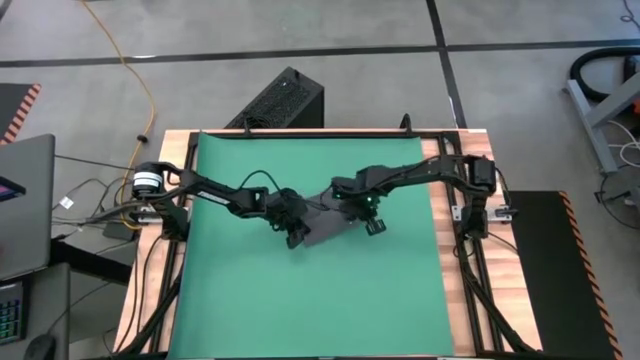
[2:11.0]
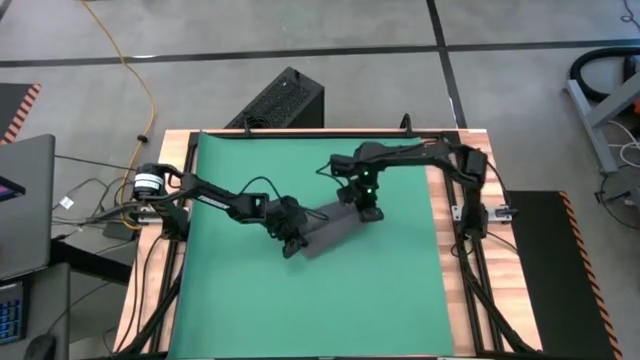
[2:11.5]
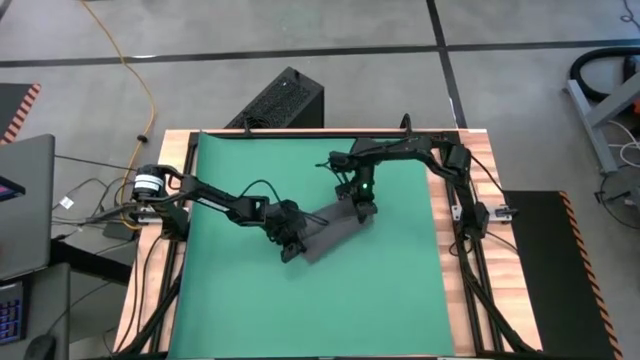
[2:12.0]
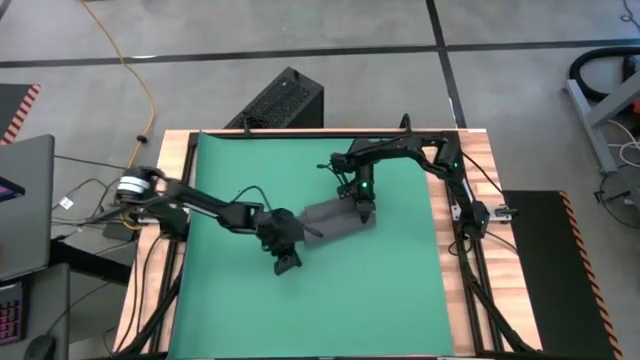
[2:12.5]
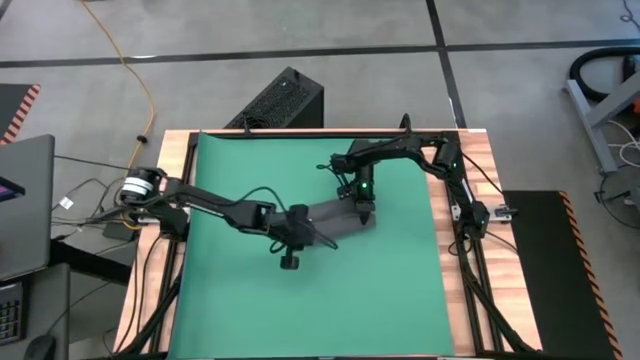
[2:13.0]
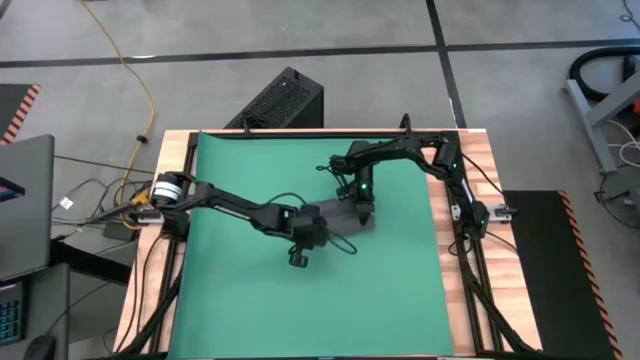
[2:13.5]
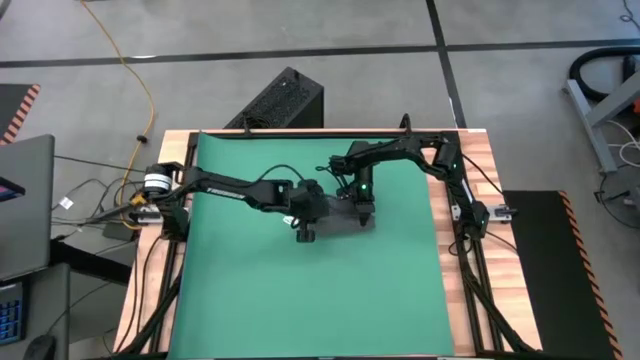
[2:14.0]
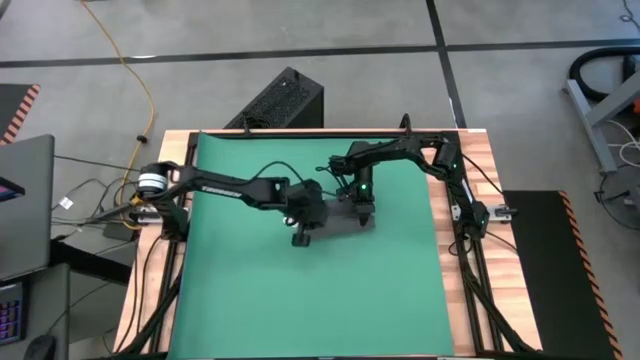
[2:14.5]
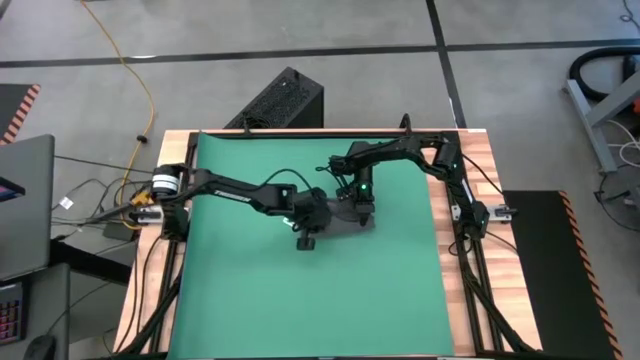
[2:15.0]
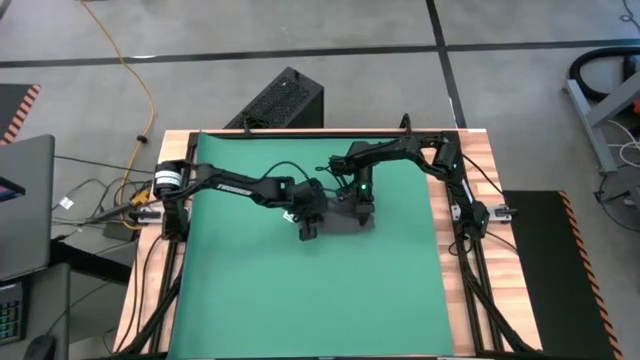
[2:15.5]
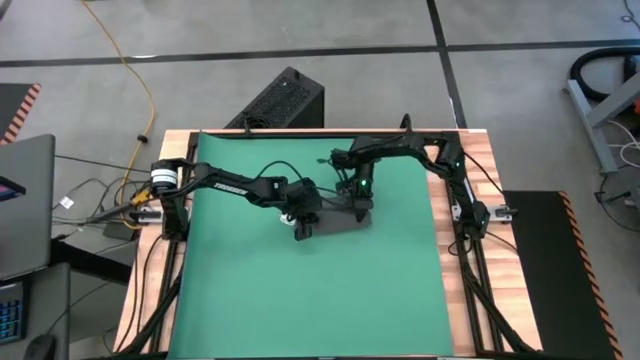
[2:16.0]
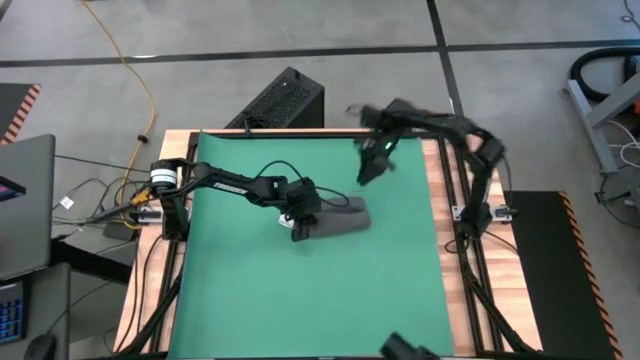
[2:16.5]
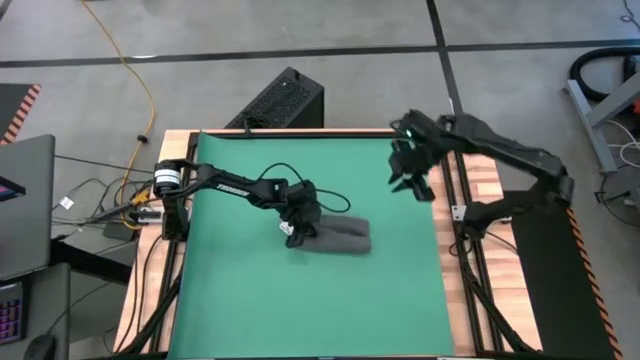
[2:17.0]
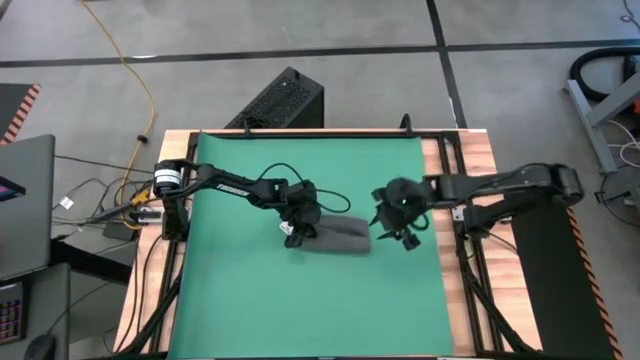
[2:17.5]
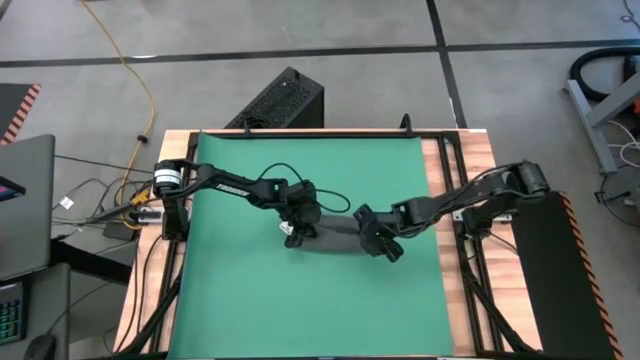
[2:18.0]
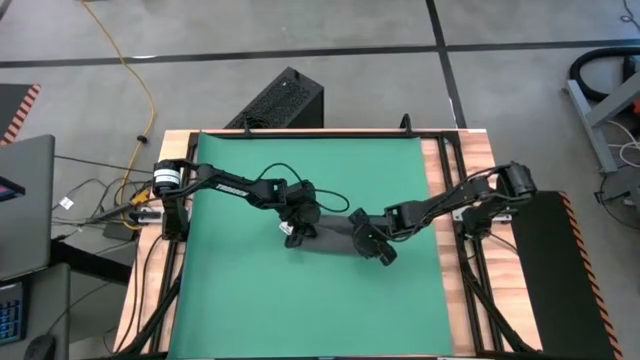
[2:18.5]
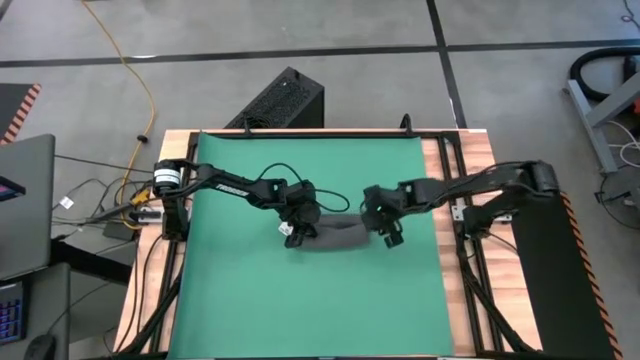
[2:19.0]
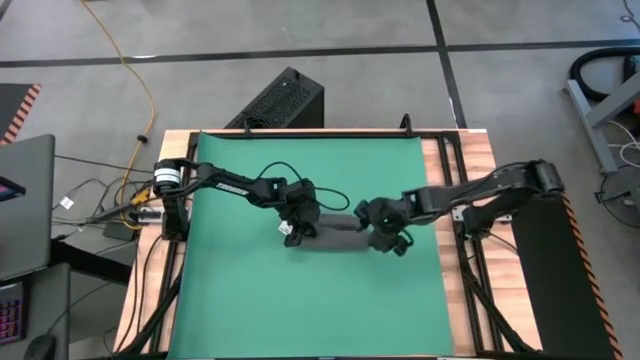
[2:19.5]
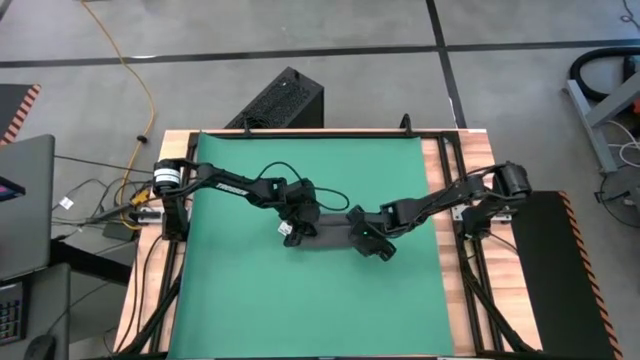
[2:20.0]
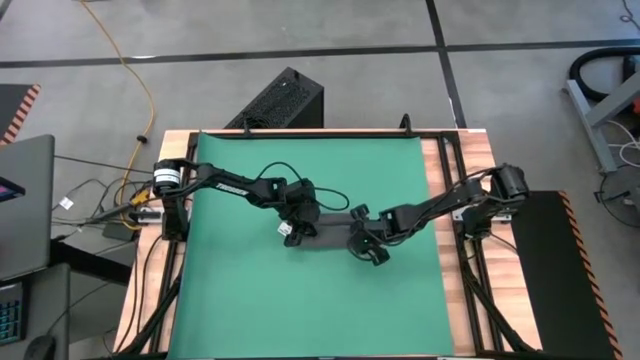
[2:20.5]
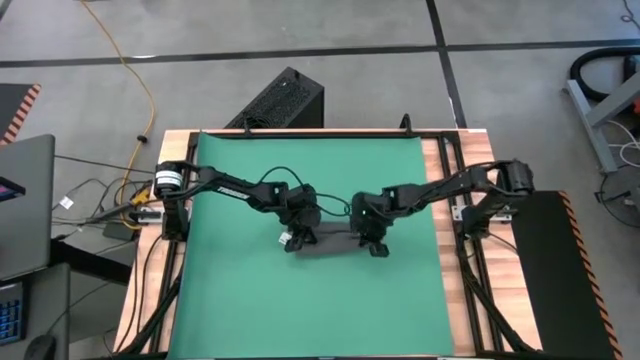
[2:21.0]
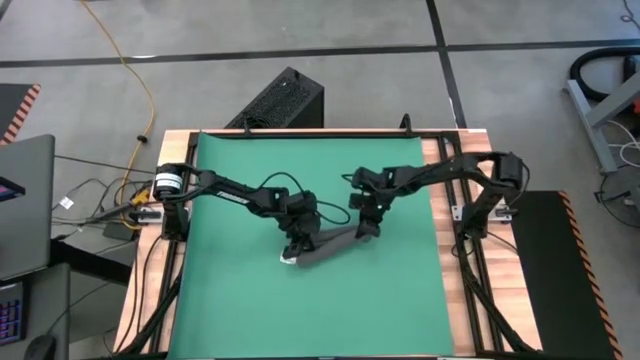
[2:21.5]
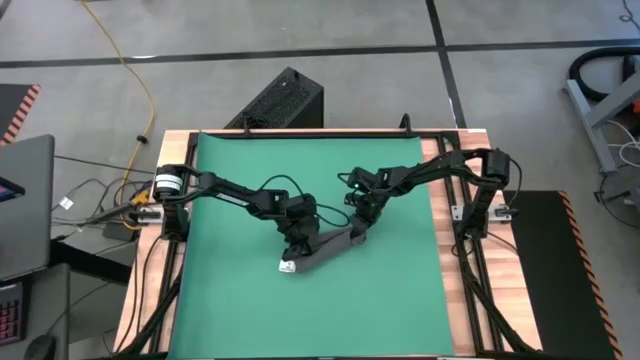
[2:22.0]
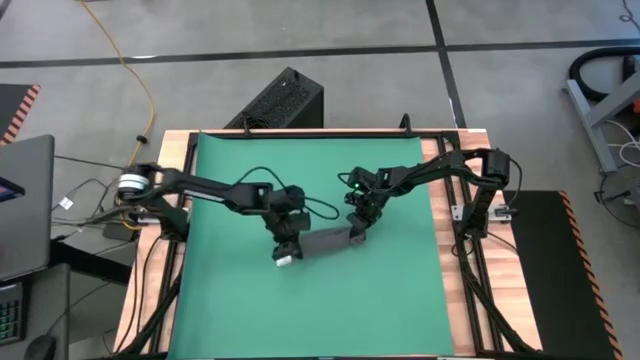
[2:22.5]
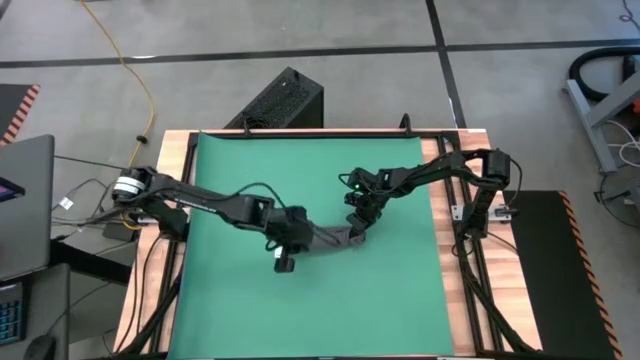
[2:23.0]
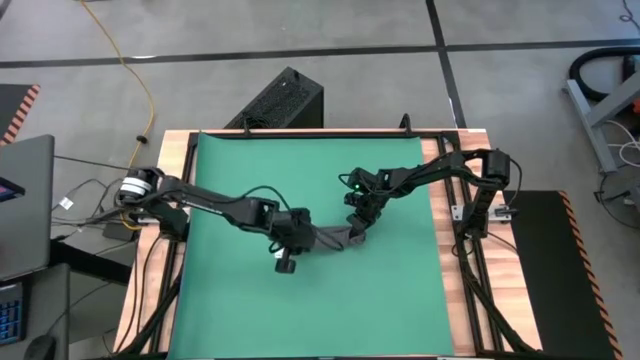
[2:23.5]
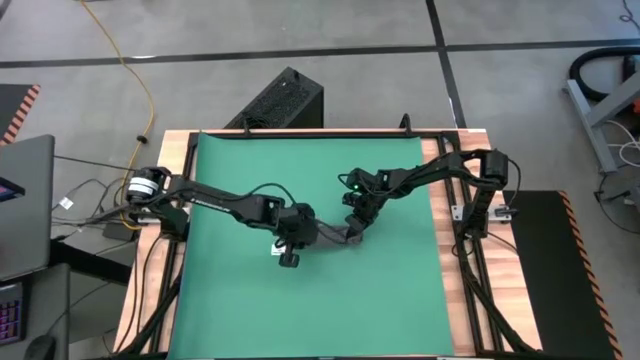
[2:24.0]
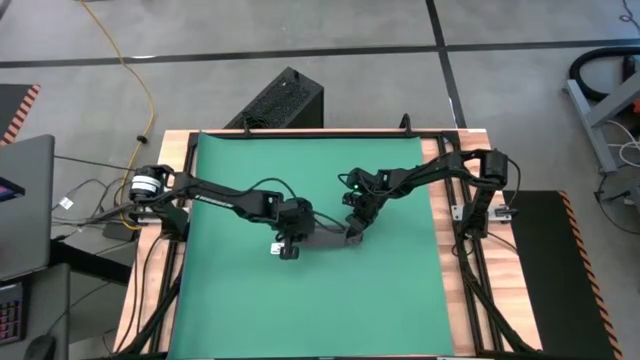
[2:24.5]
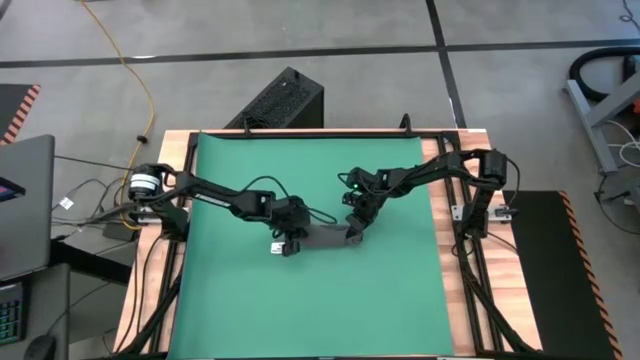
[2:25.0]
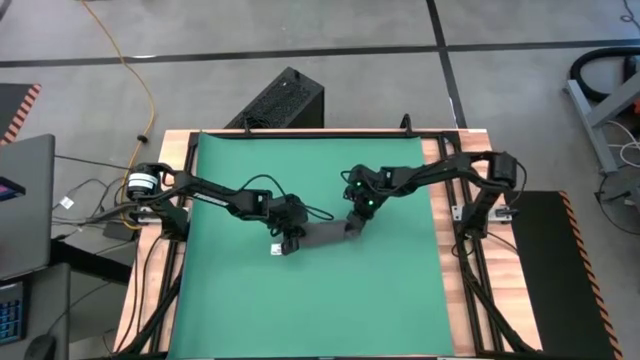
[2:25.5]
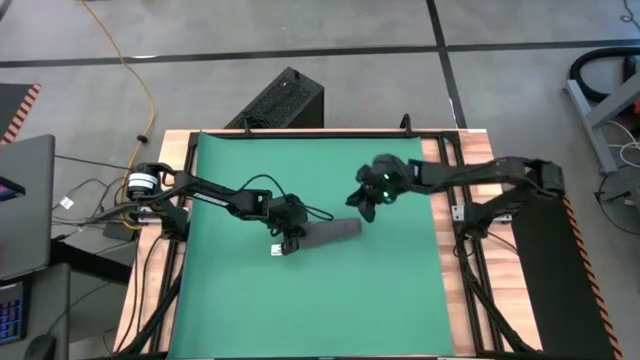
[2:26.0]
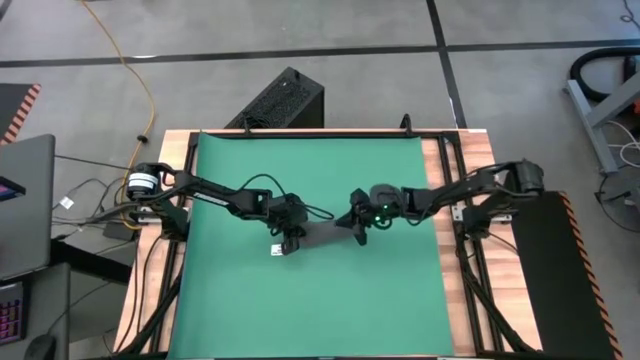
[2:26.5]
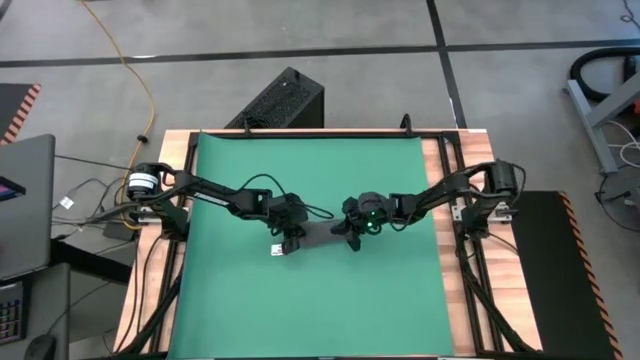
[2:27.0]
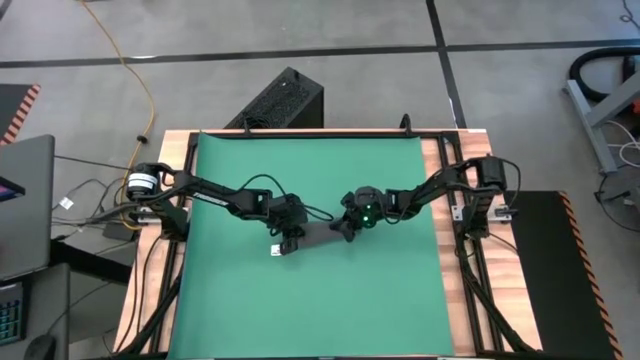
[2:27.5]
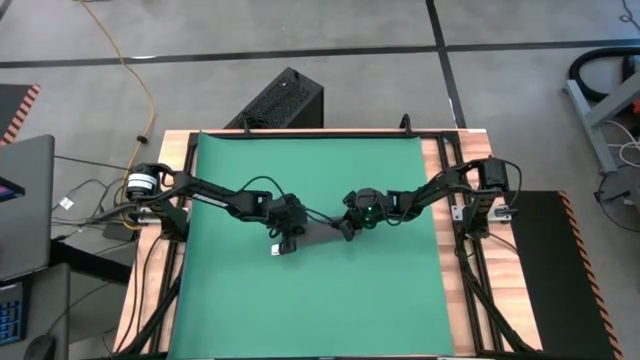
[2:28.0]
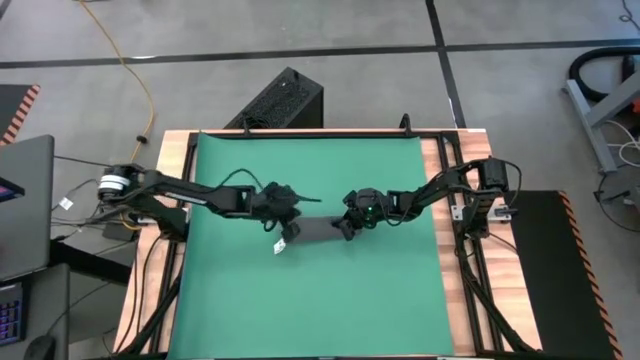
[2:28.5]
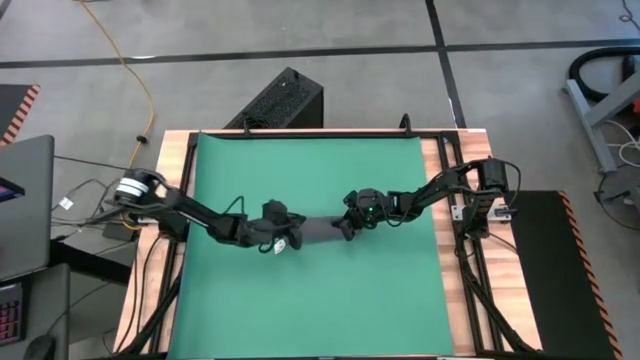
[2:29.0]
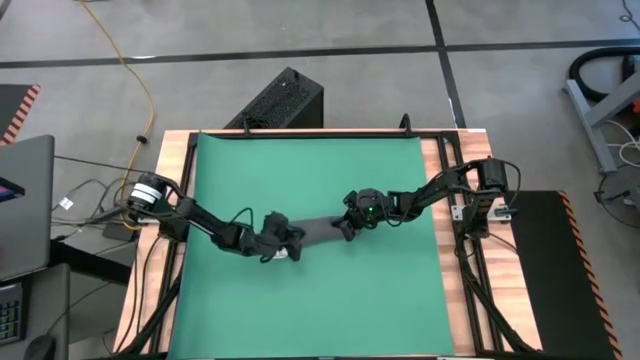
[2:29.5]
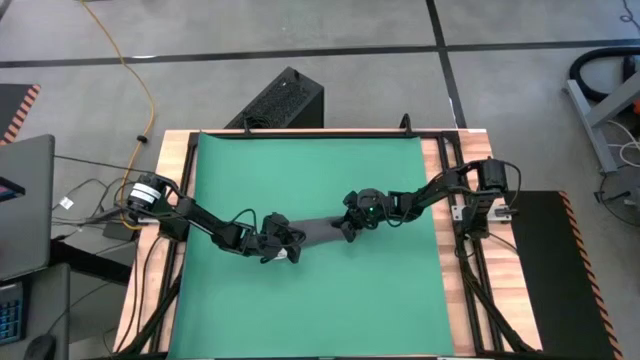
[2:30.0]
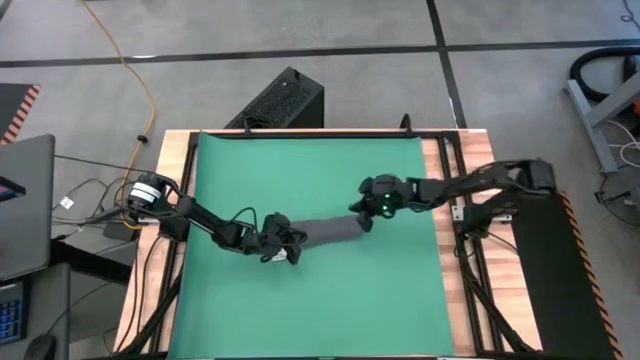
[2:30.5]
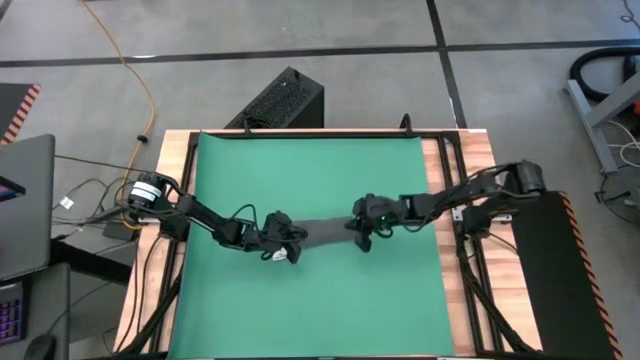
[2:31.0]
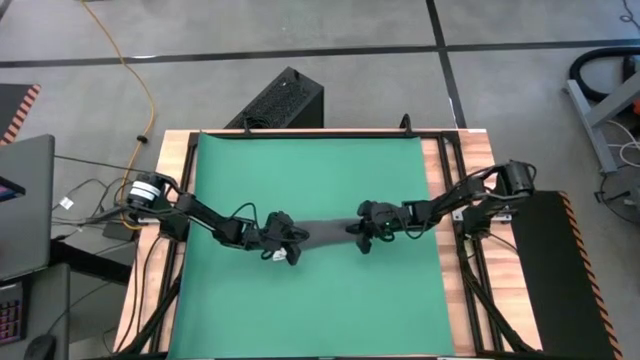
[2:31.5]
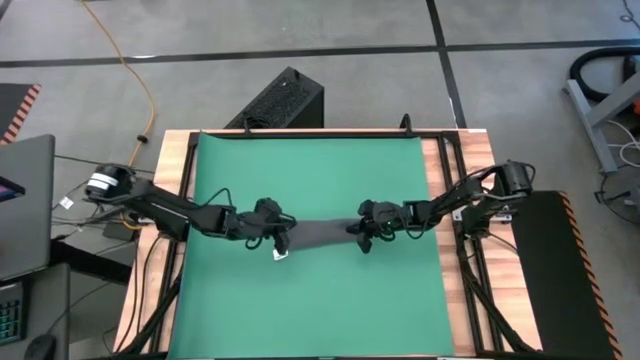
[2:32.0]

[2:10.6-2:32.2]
Task: Roll towel into tight, uniform cylinder
Roll the gray towel
